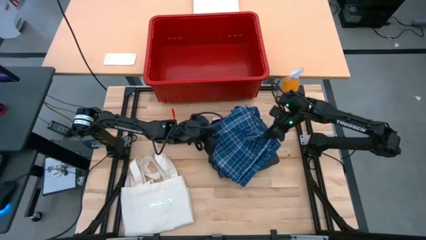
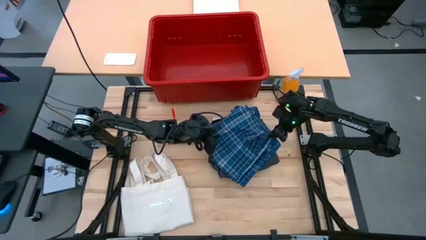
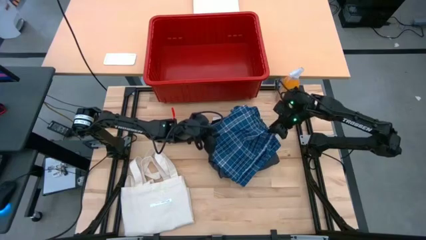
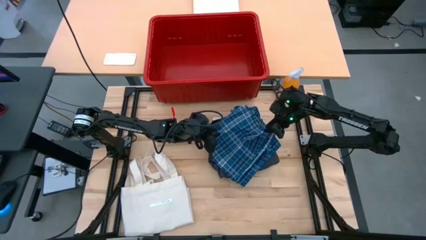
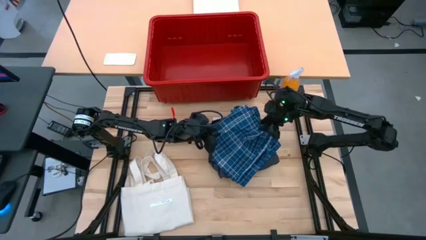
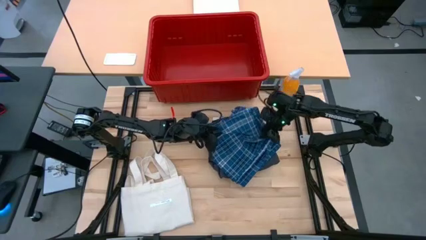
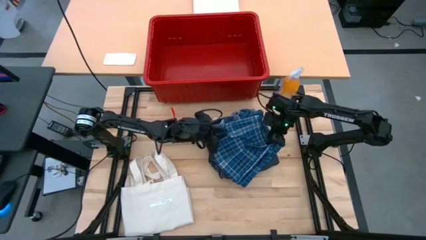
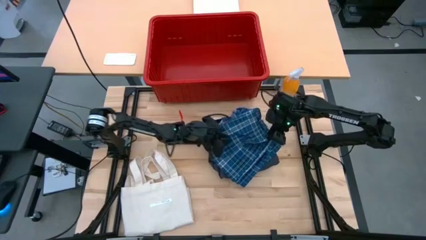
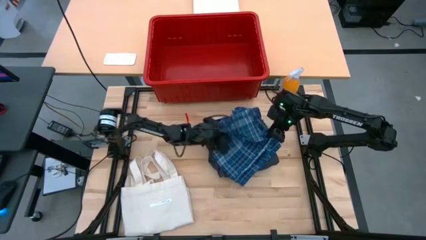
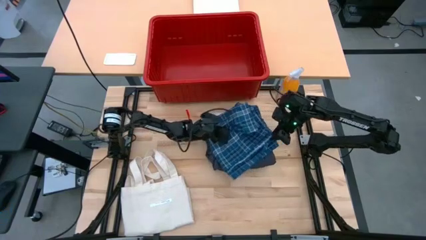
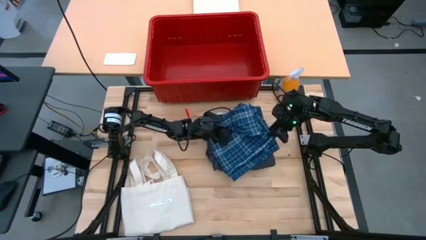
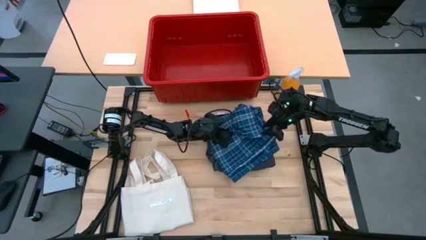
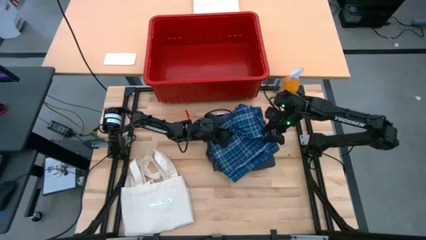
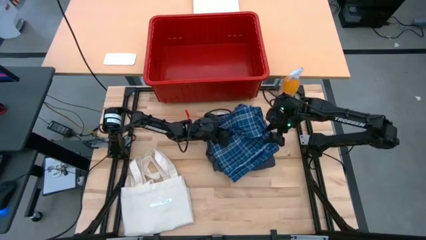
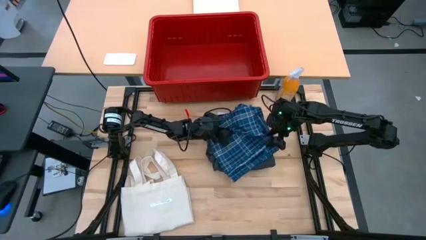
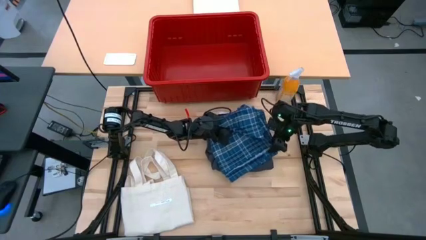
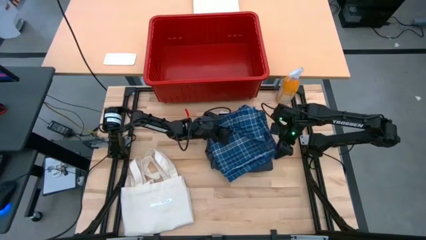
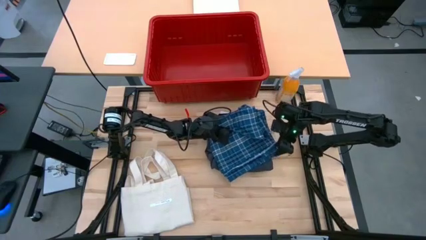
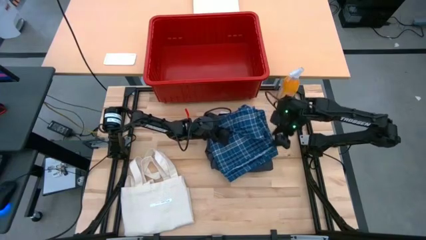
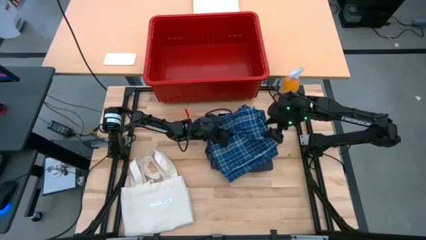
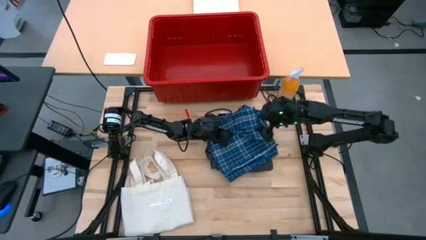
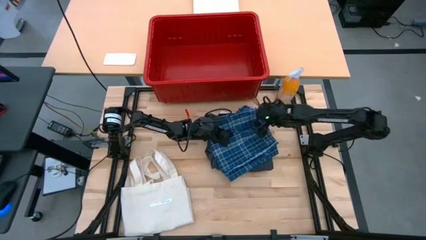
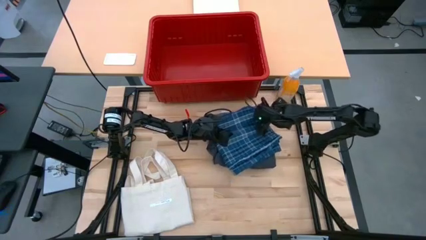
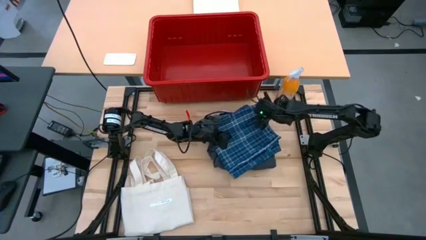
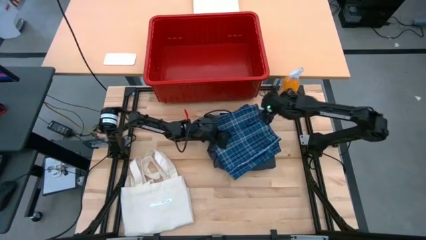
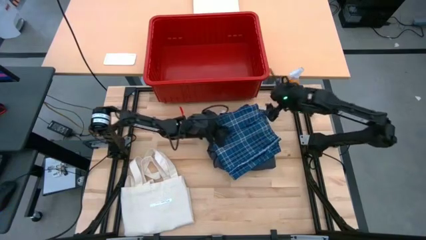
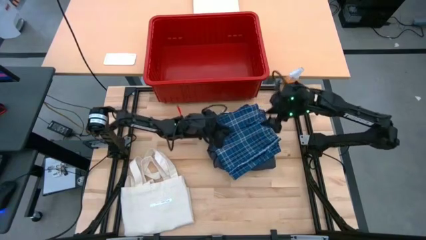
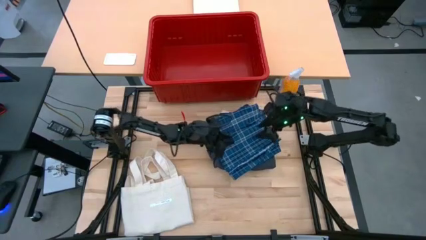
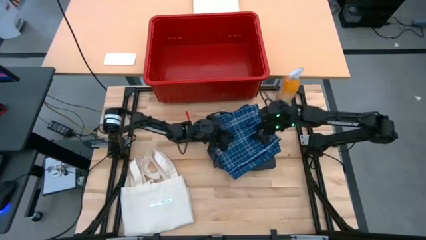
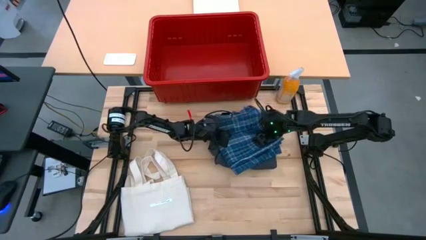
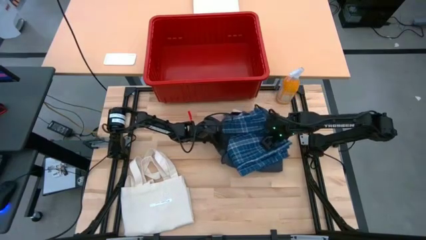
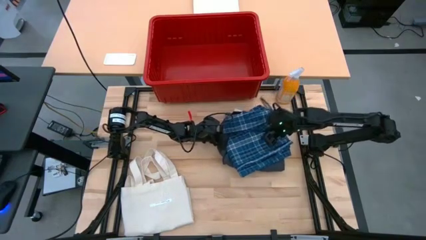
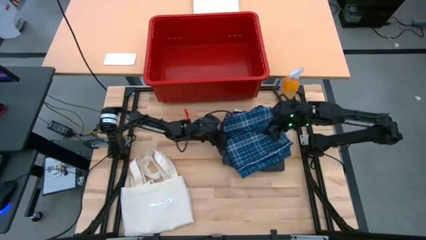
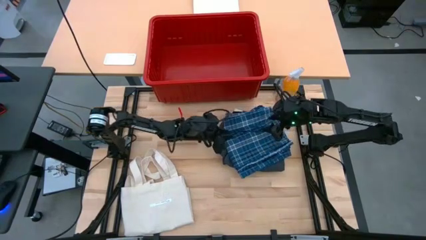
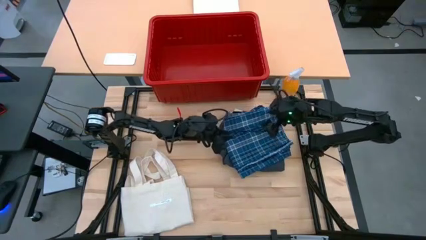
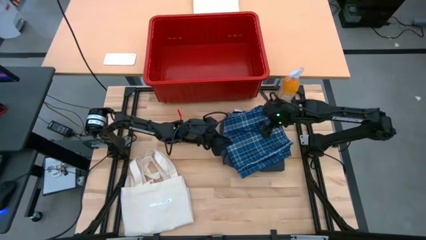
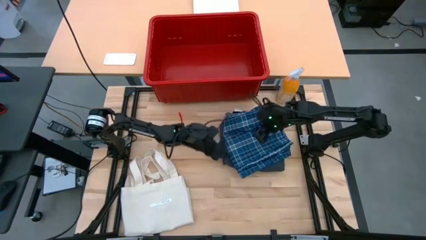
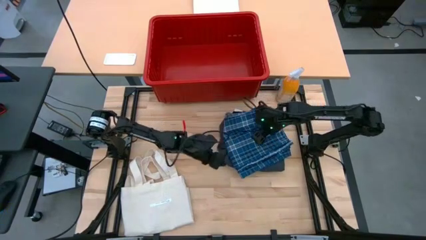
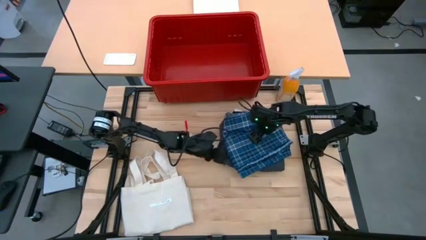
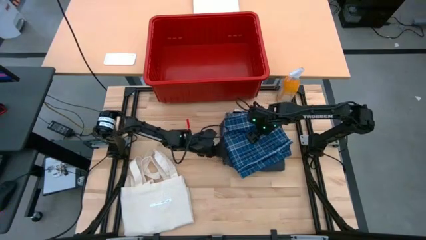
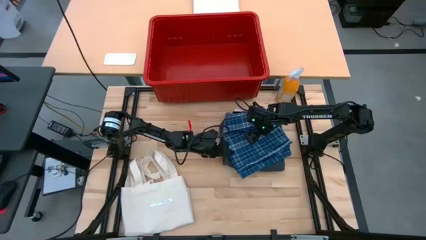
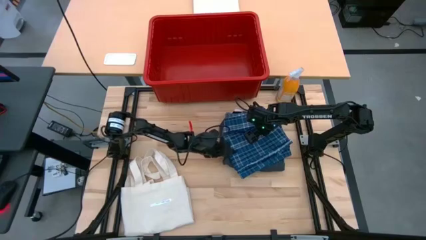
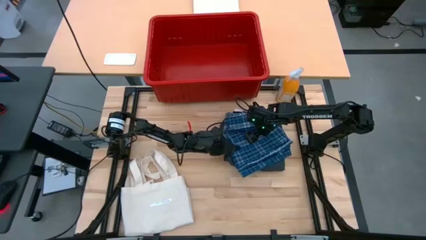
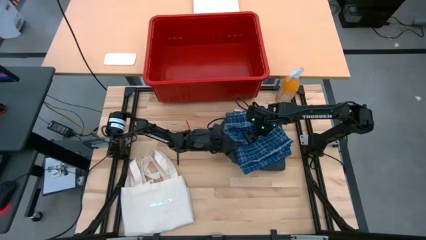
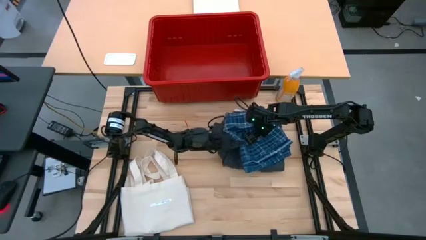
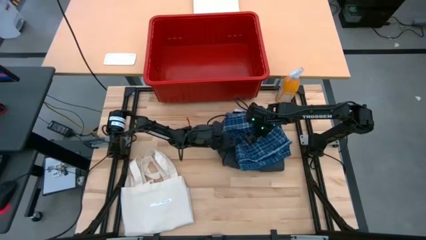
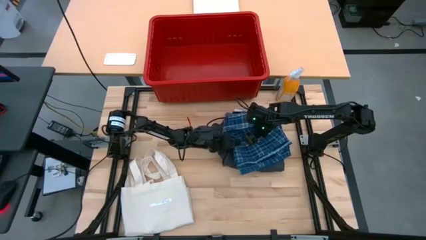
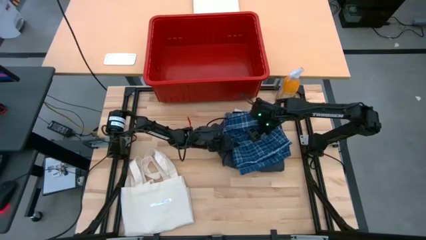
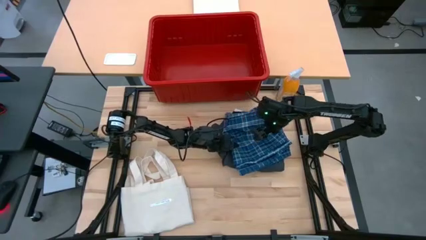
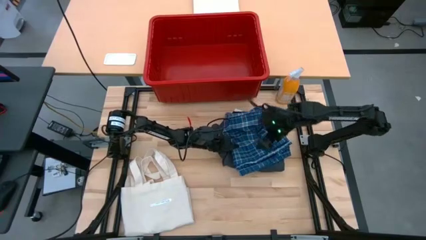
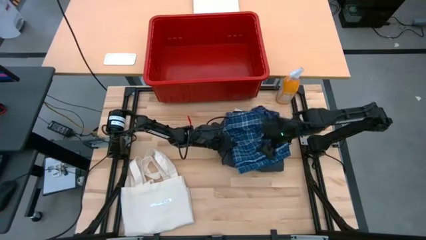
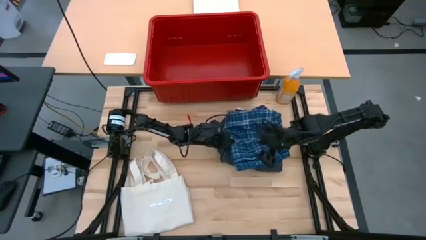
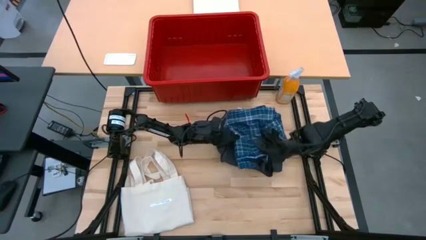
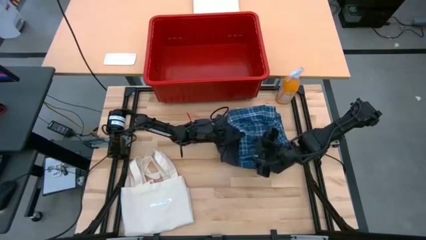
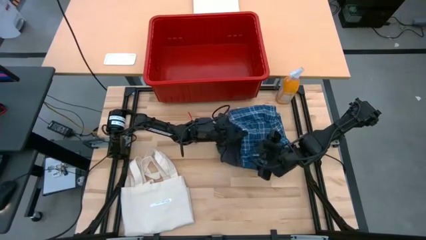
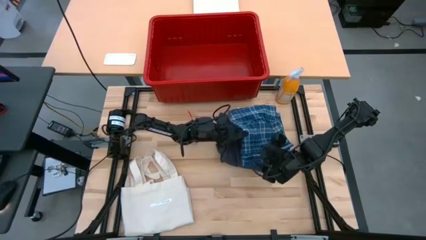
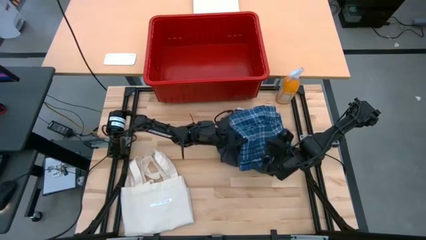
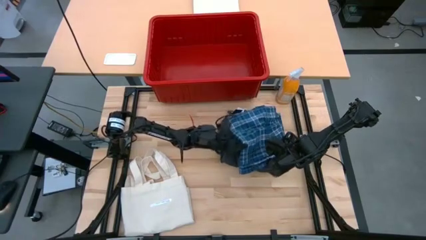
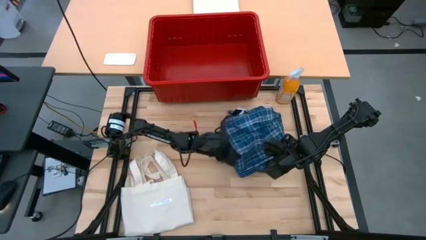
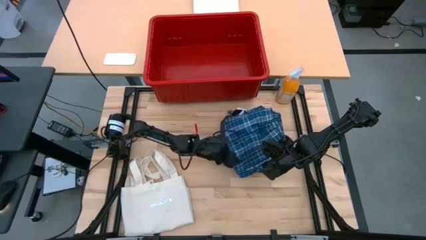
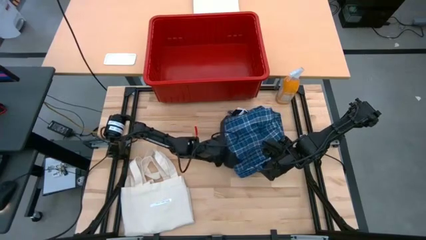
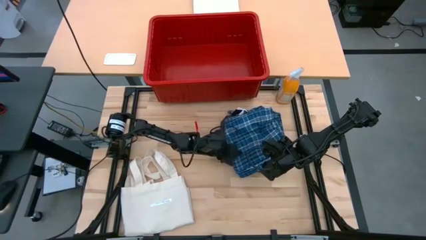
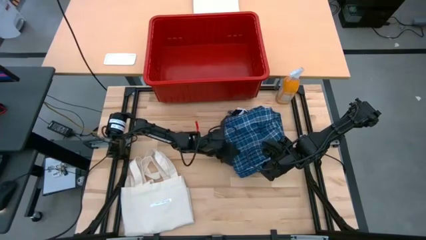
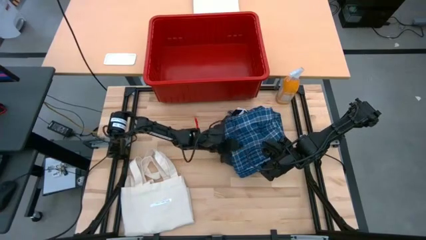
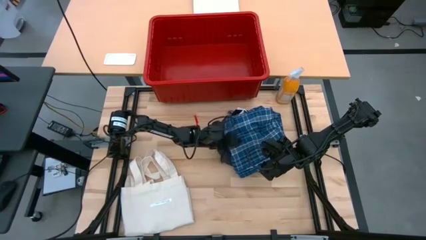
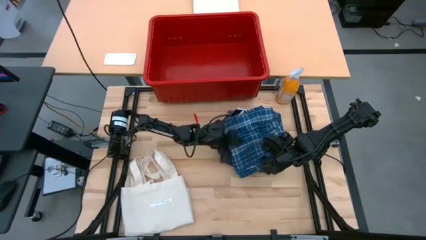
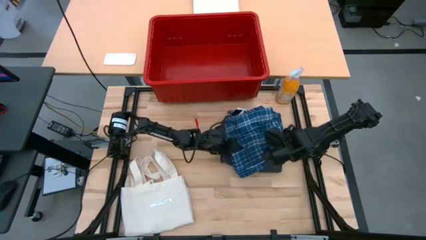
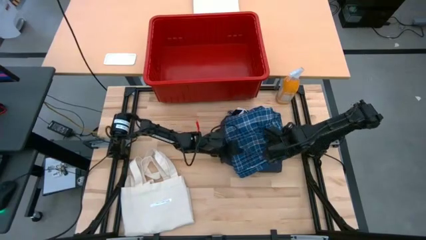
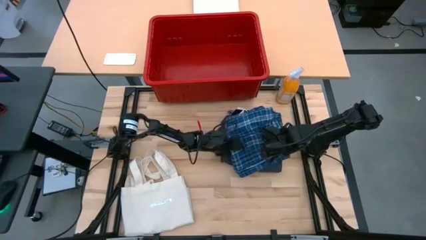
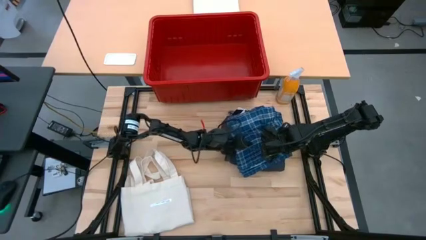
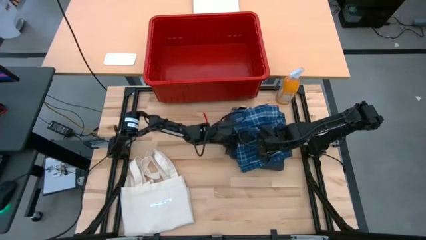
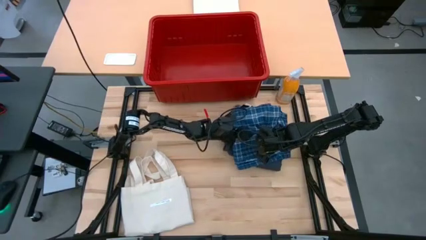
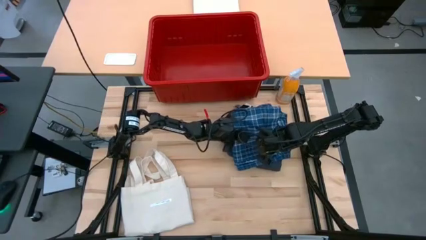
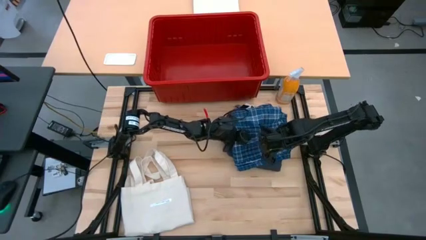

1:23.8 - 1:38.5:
Task: Fold laundry
Remove the blue shorts from the red organizer bin

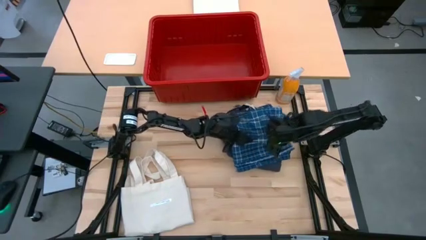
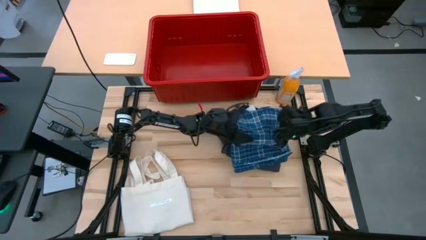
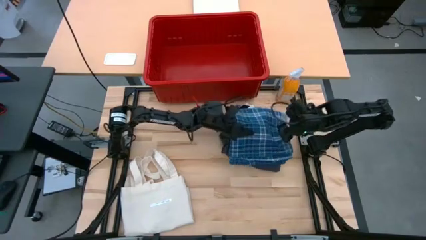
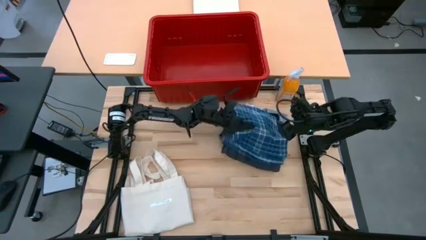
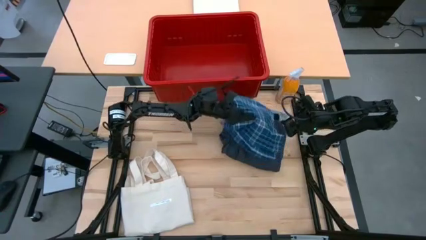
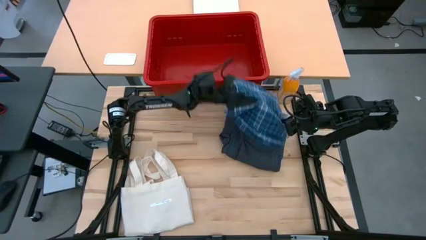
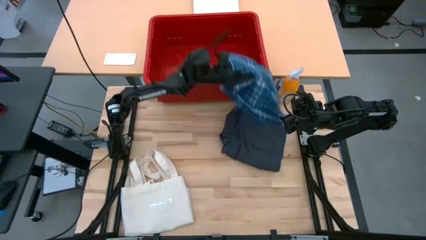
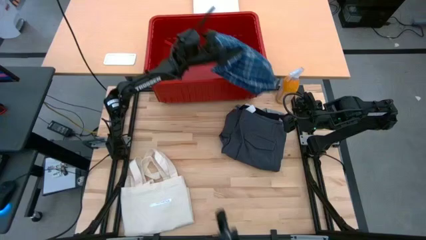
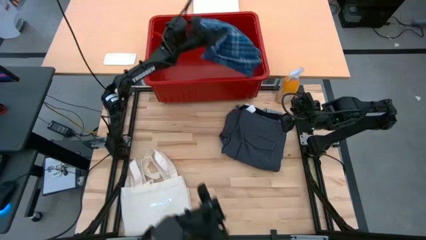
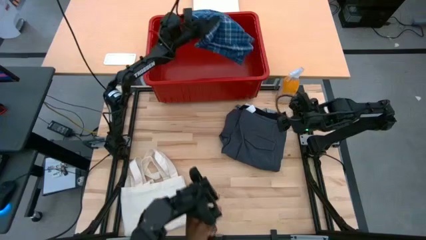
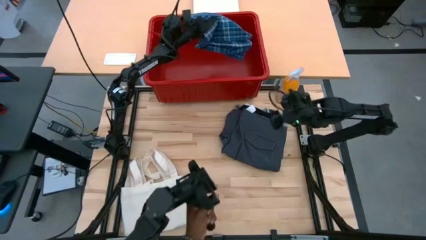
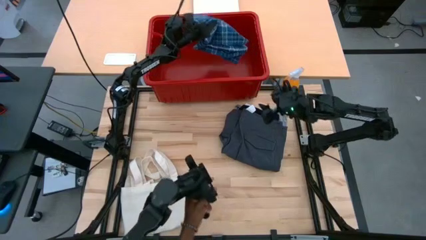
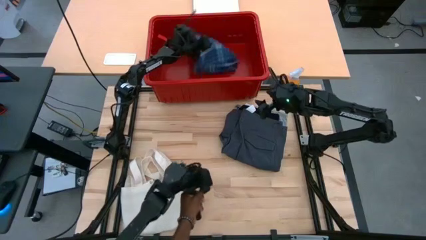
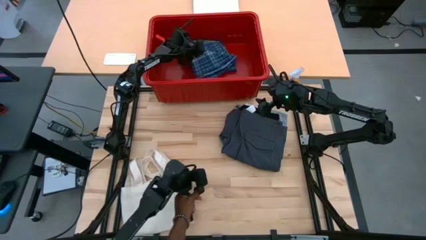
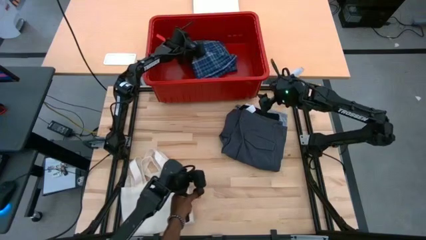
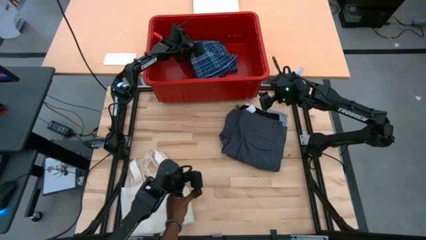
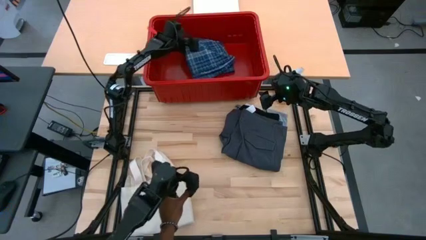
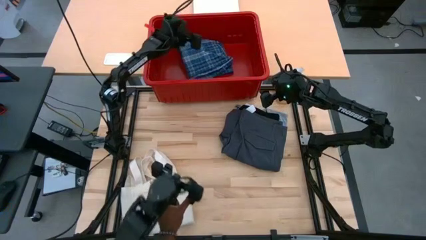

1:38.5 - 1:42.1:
Stack the blue shorts in the red organizer bin
